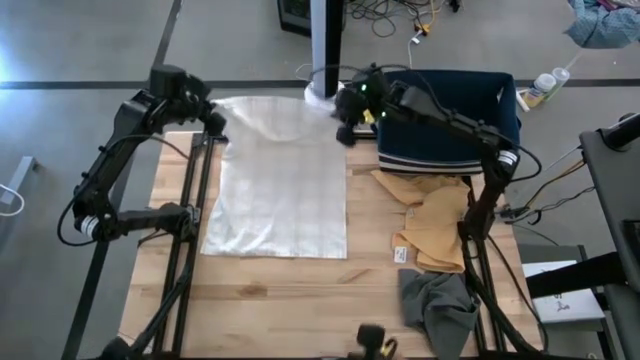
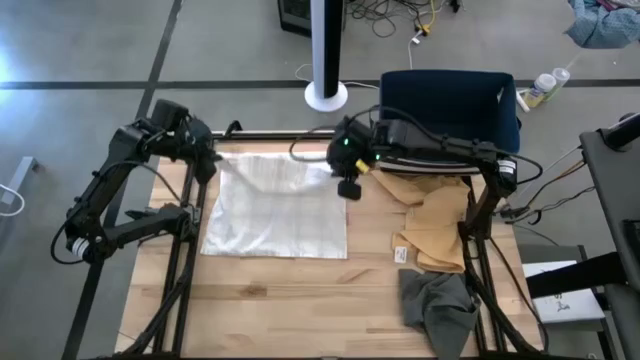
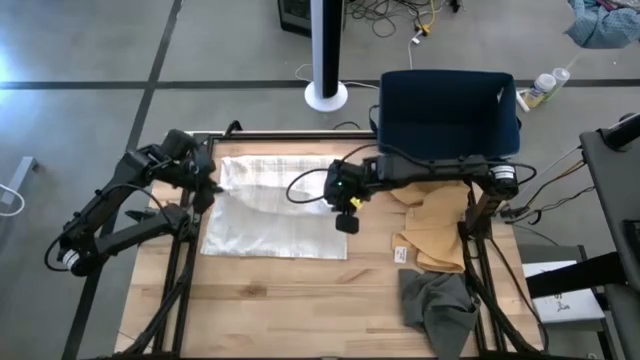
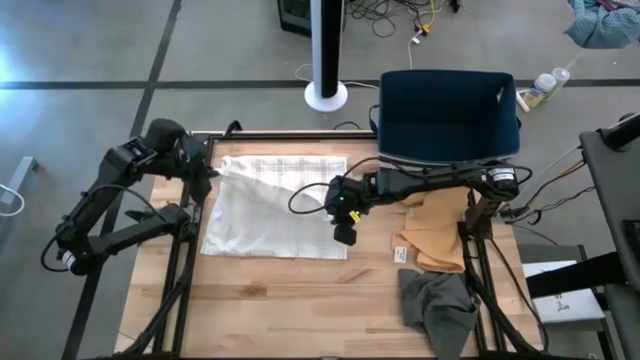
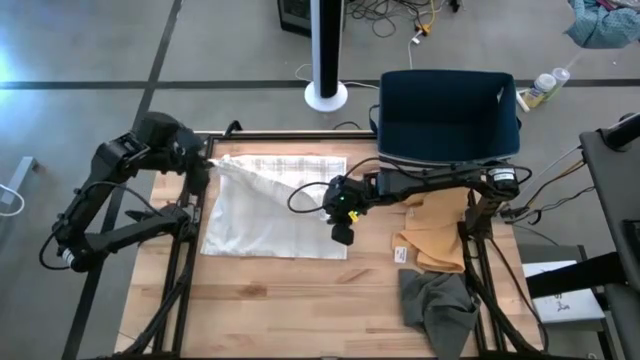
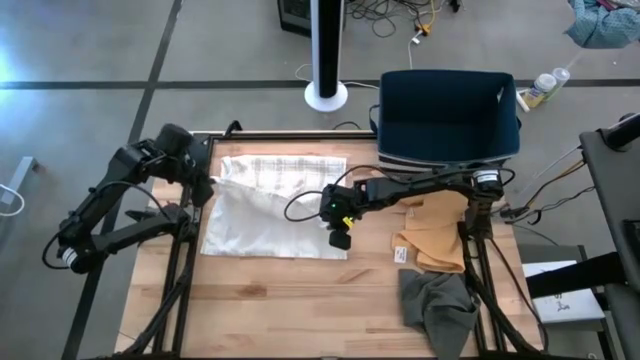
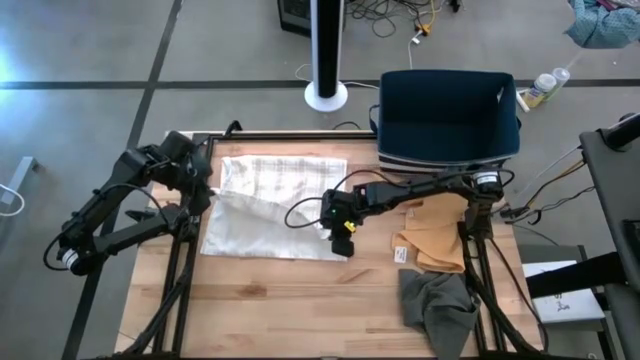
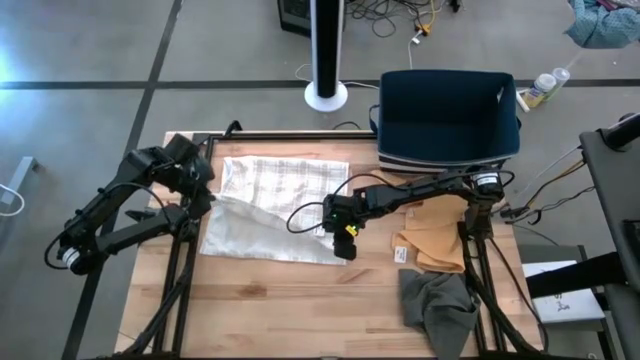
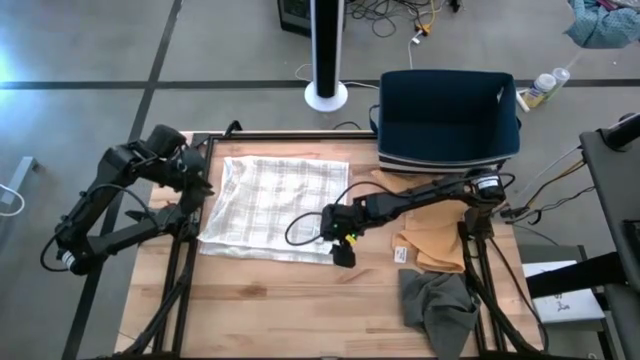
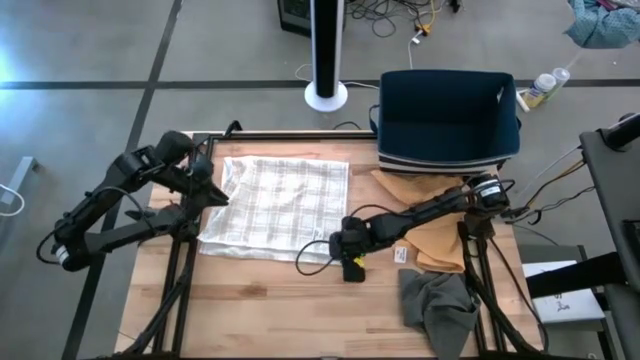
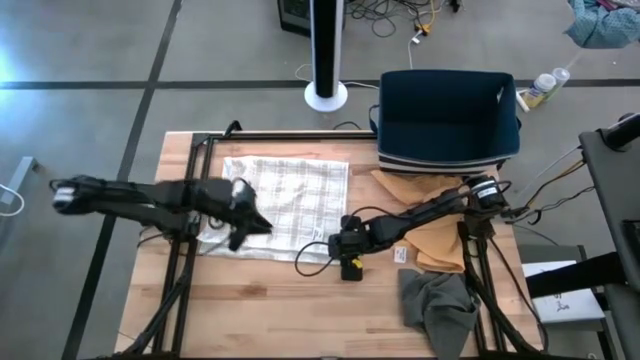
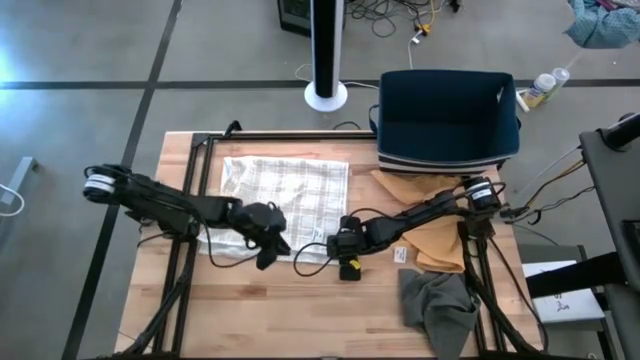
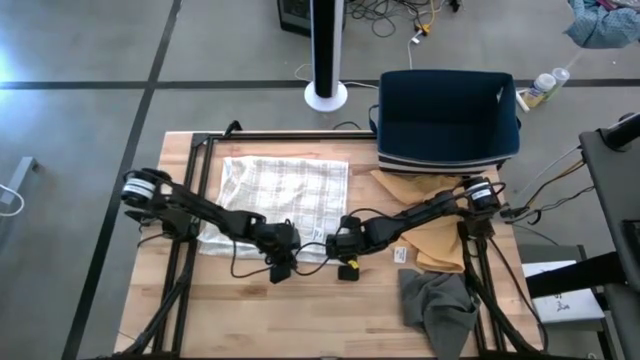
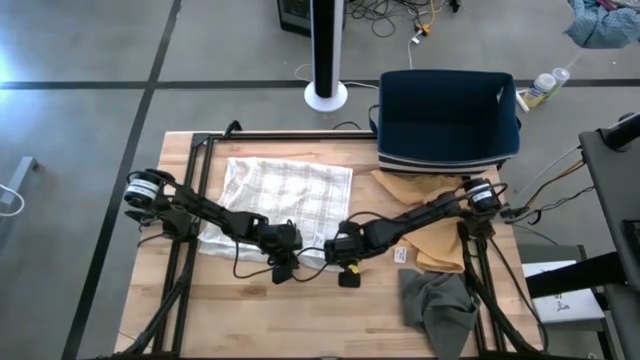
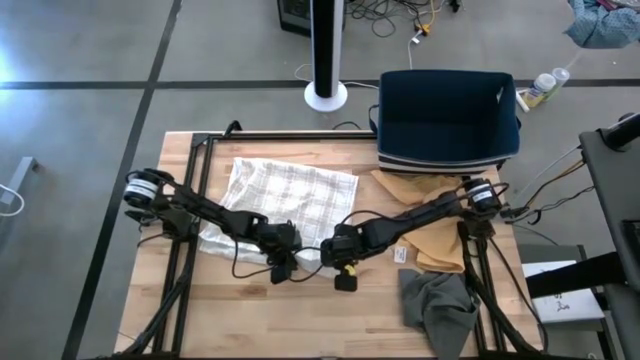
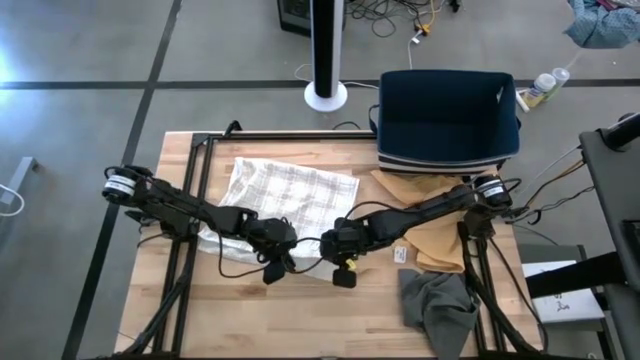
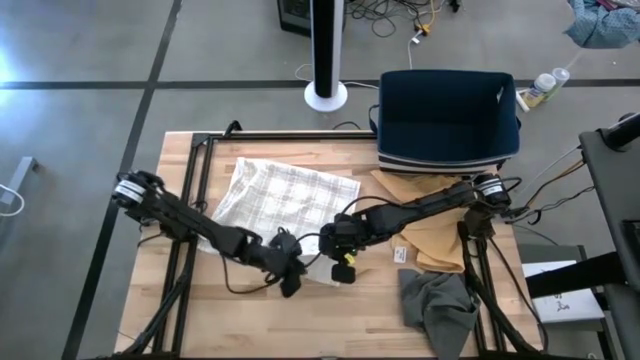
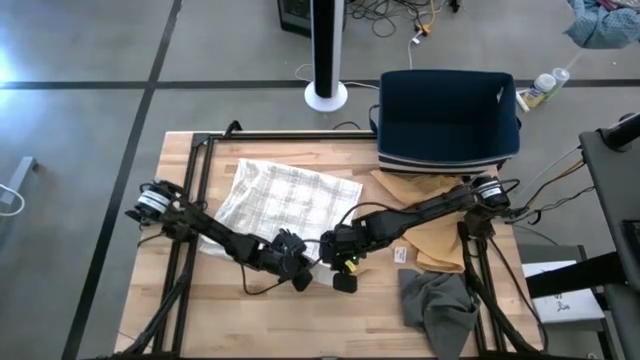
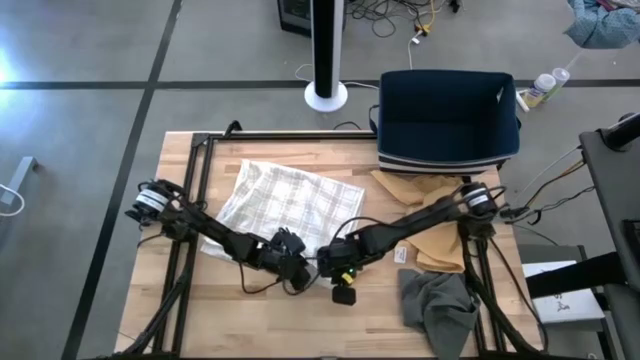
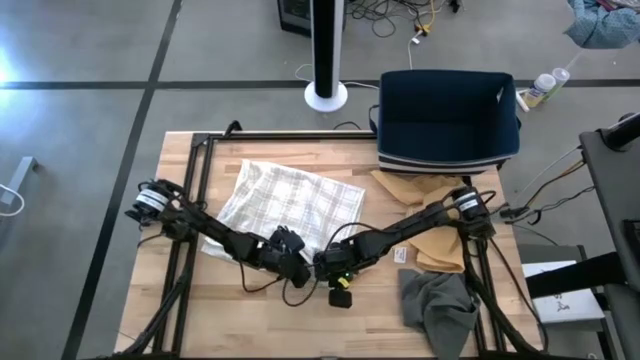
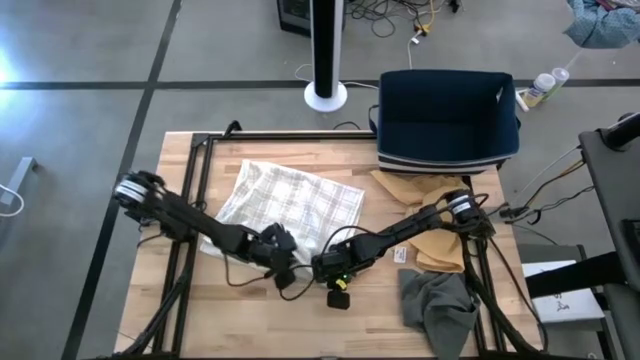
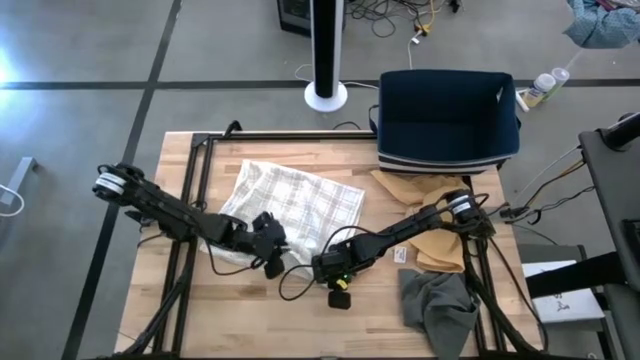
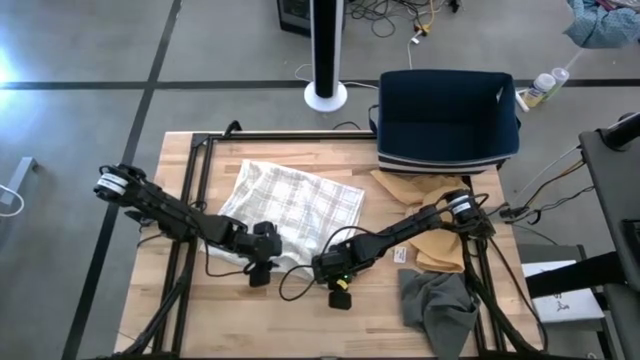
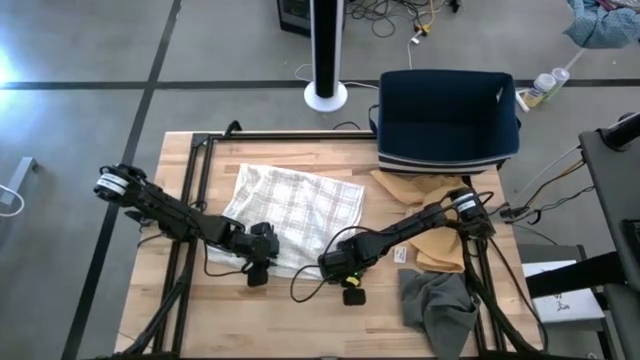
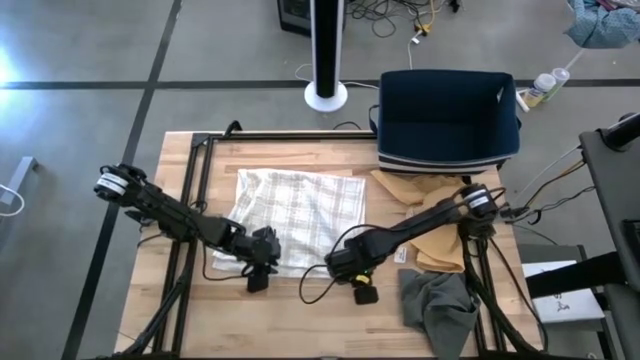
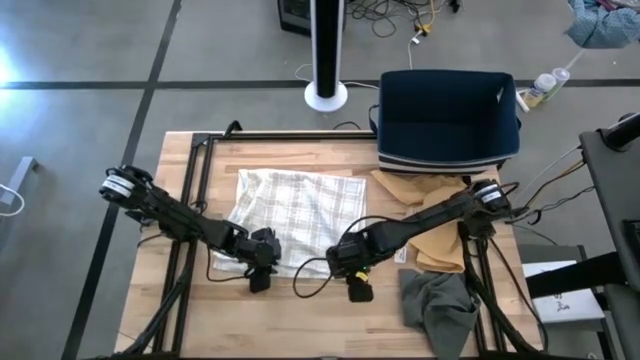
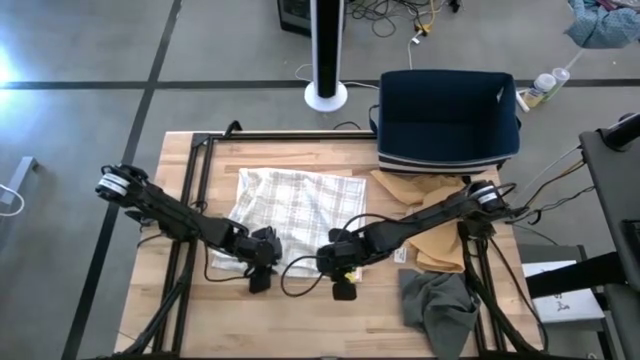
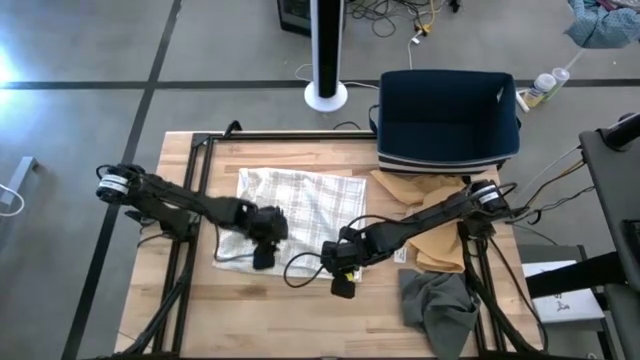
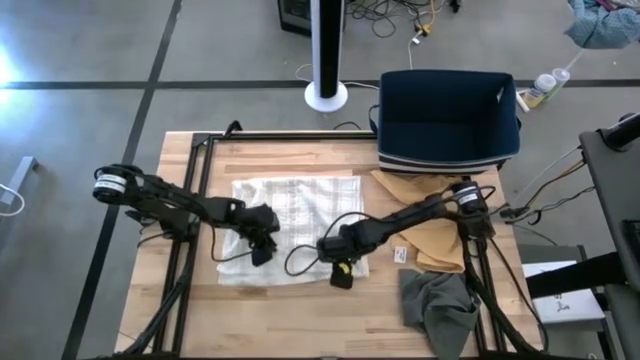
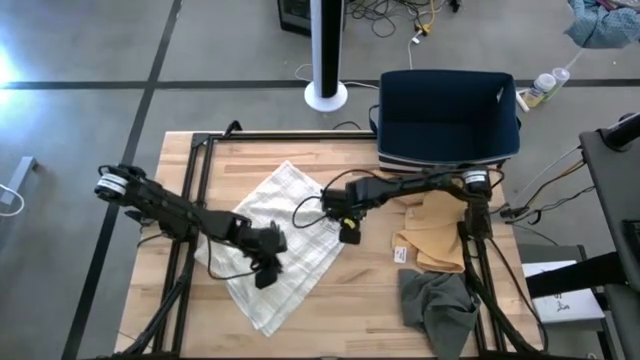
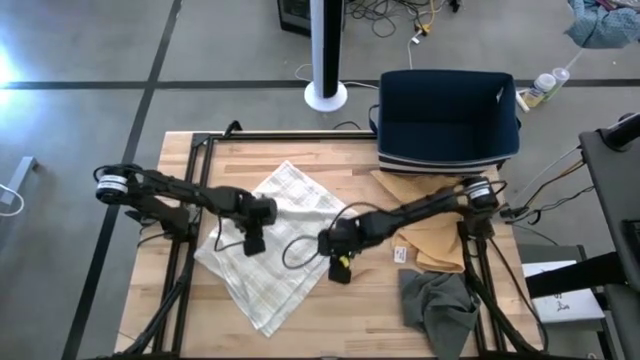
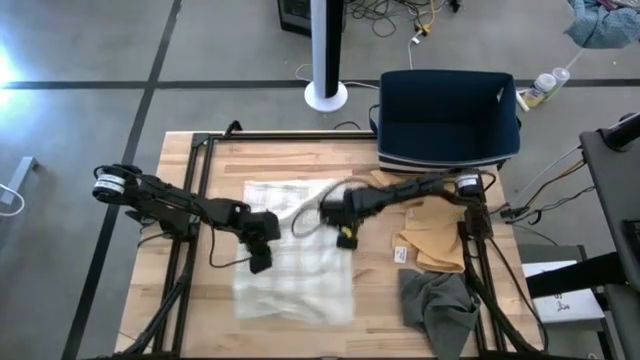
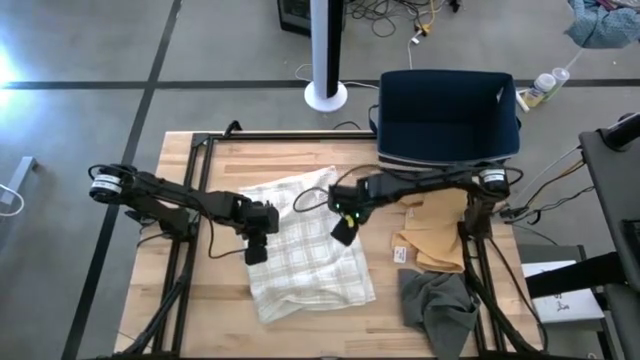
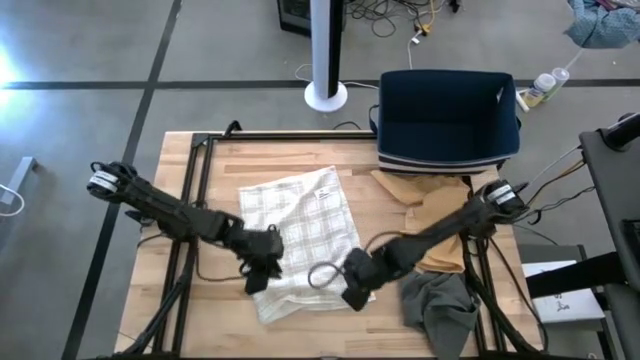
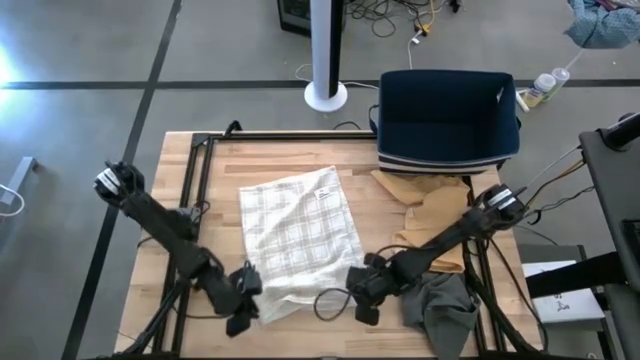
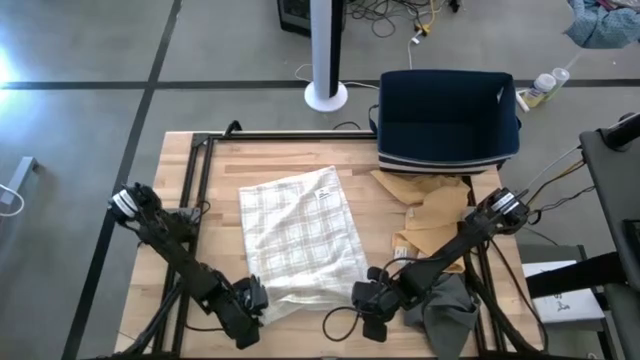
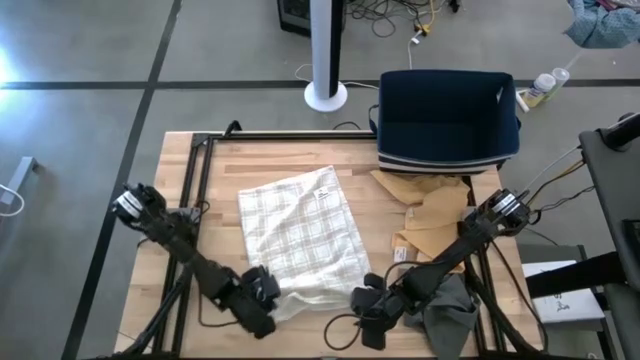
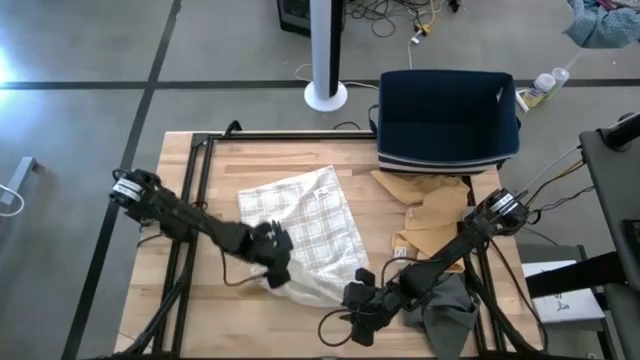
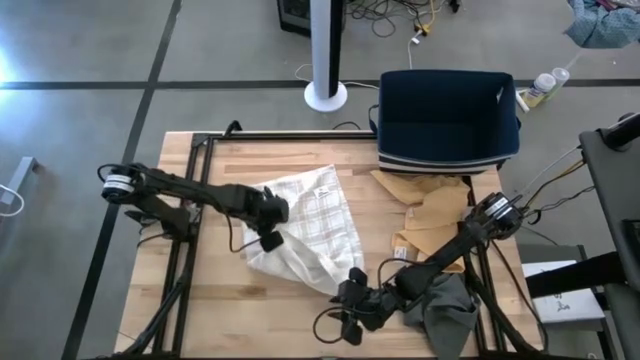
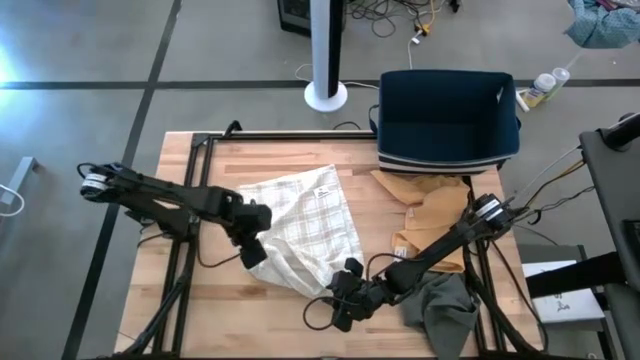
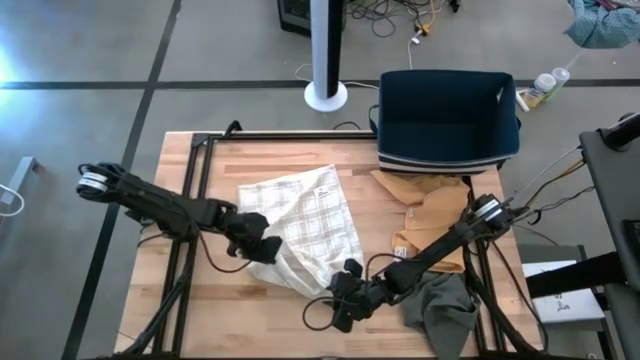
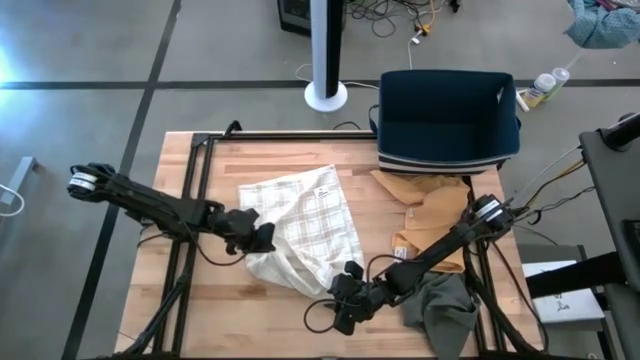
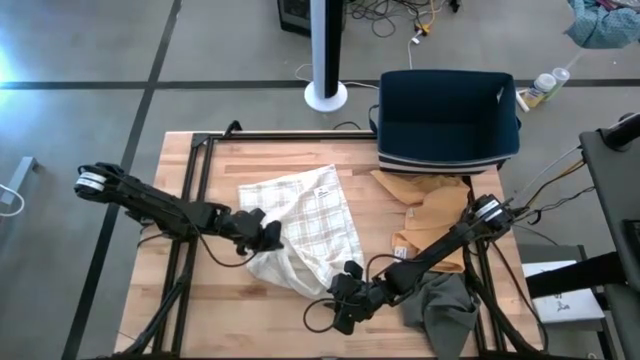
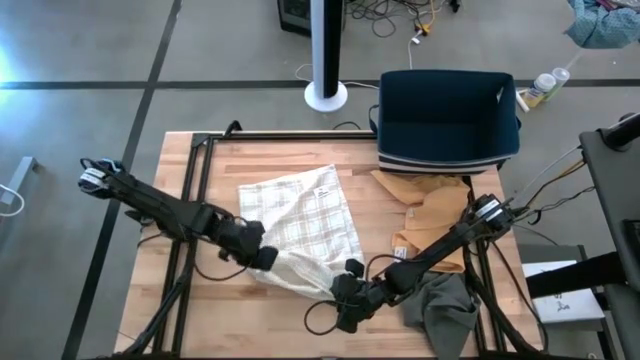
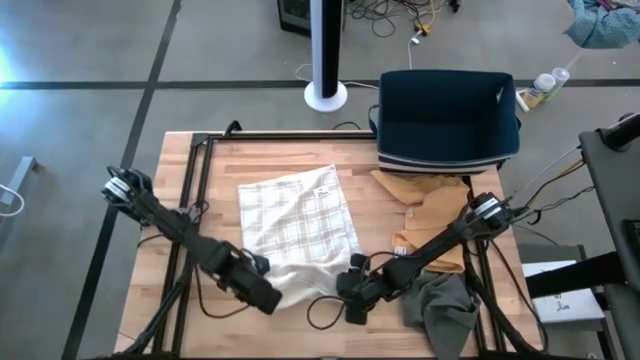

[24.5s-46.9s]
Task: Fold towel
Fold the white towel
